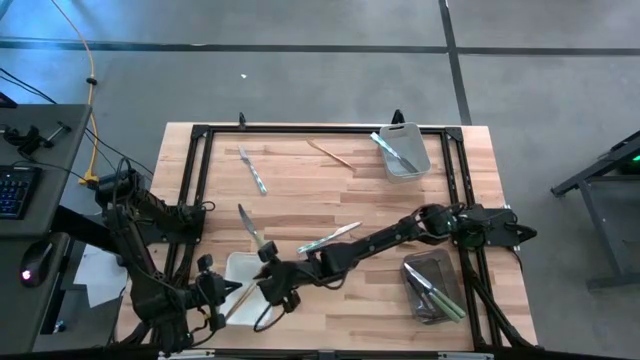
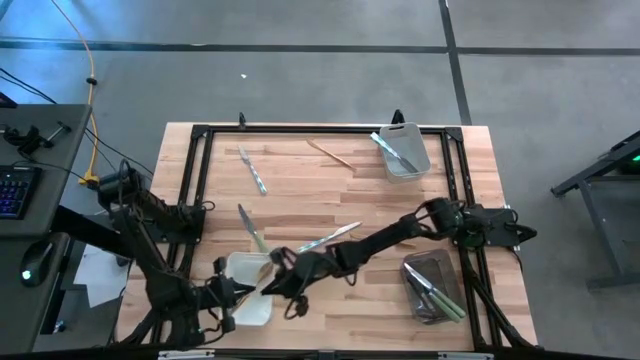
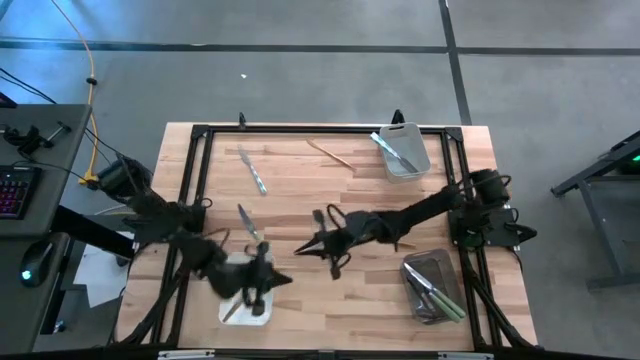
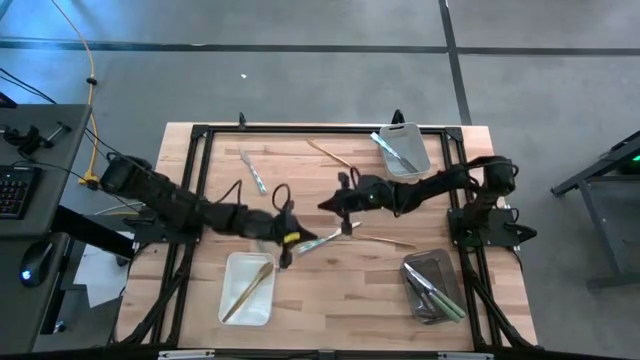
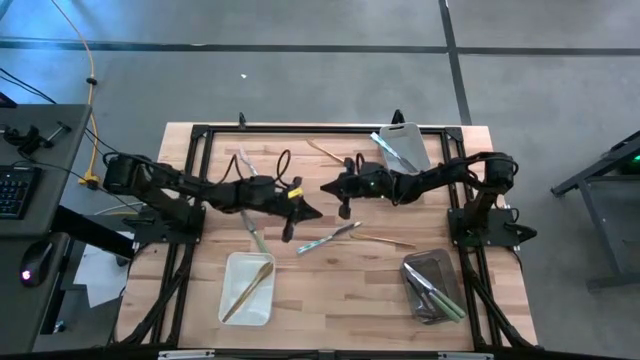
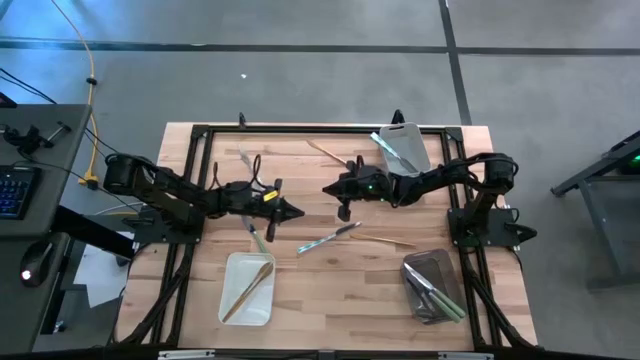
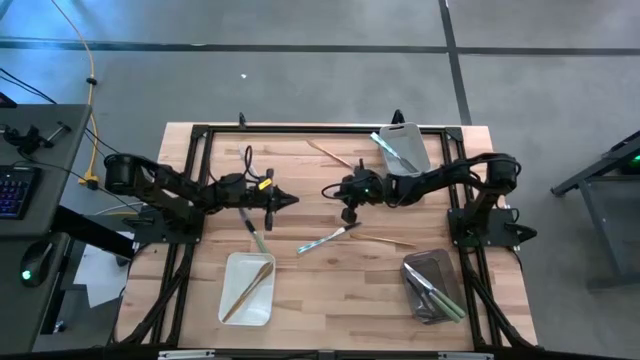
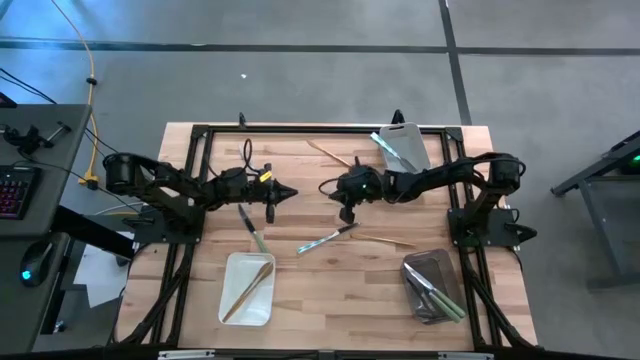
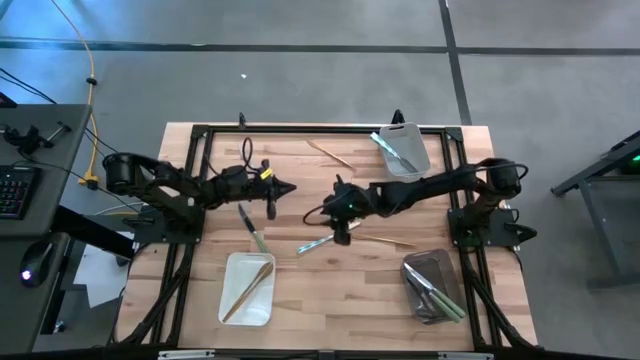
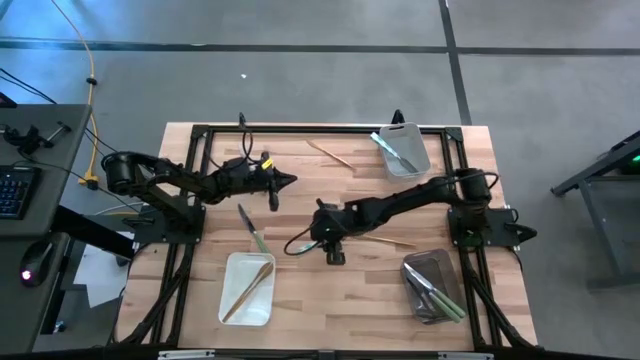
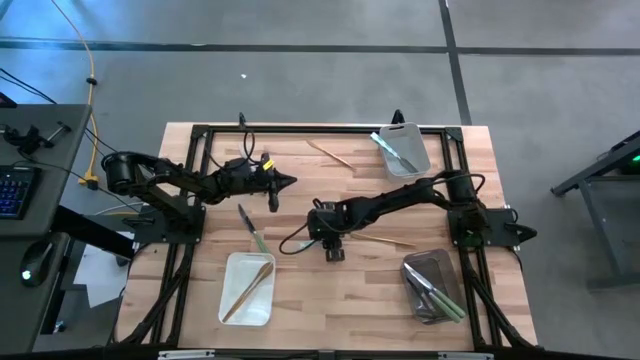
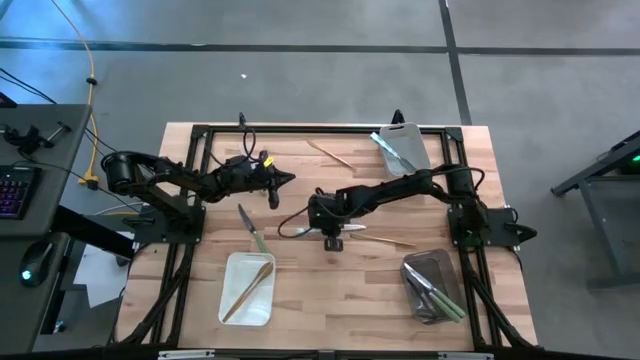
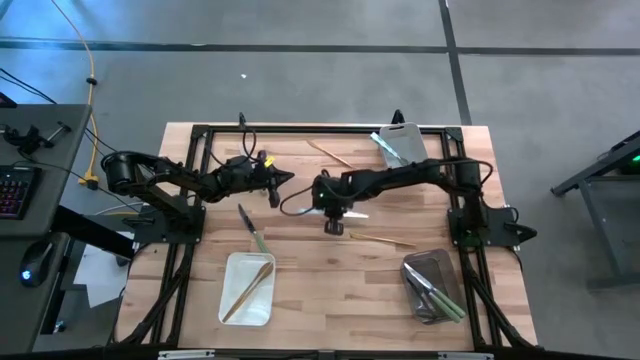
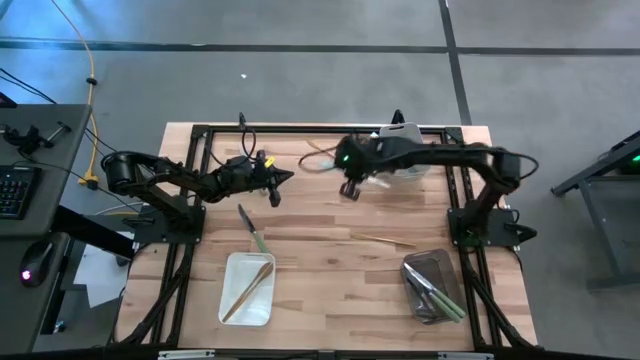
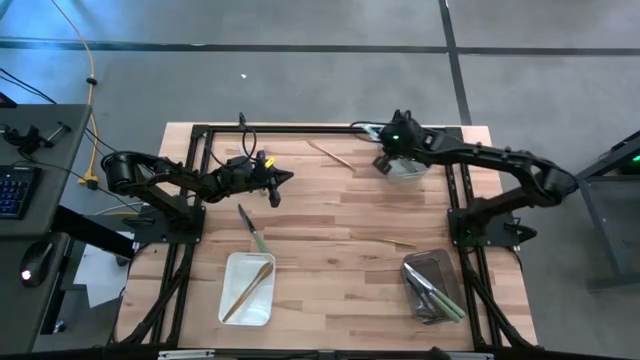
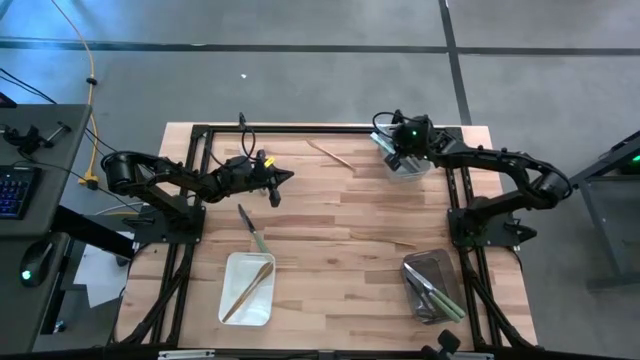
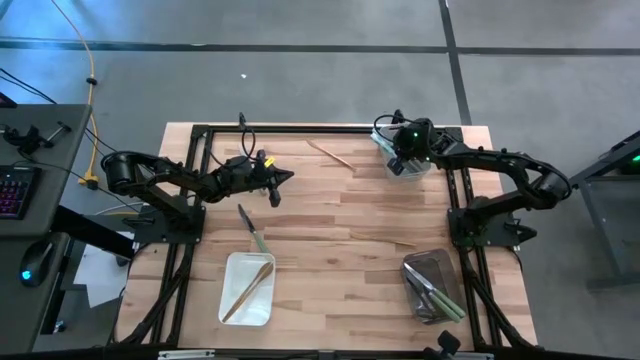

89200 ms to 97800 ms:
Task: Sort silverware by color (type)
Put the blue patterned table knife into the gray bin

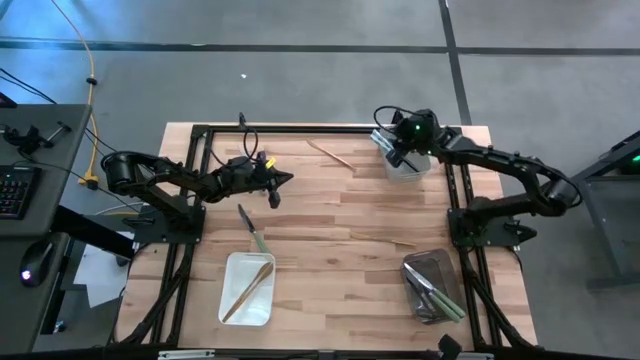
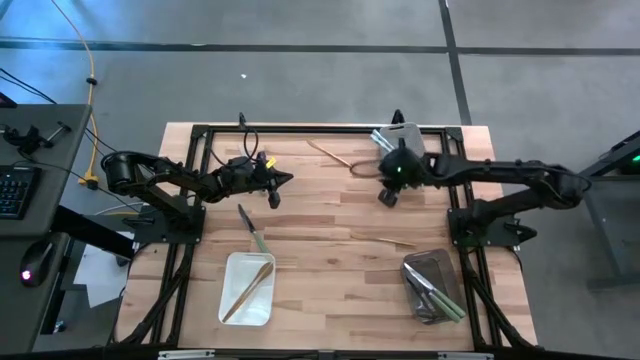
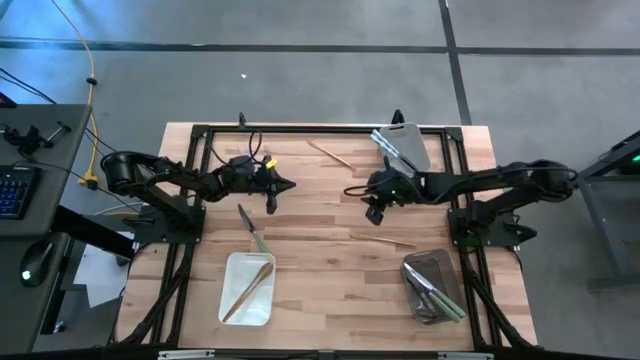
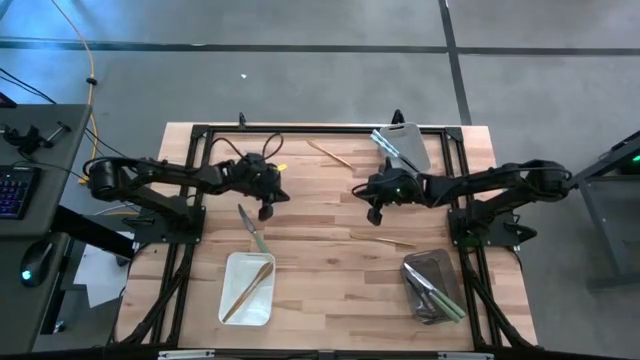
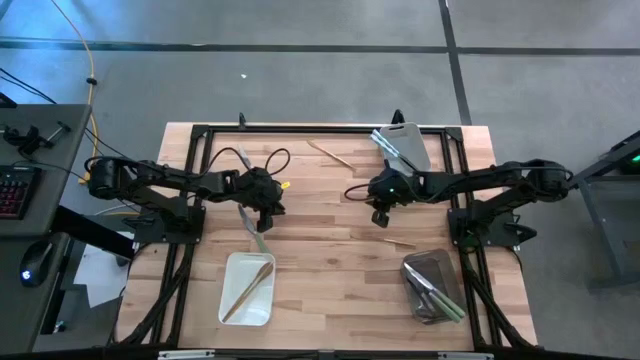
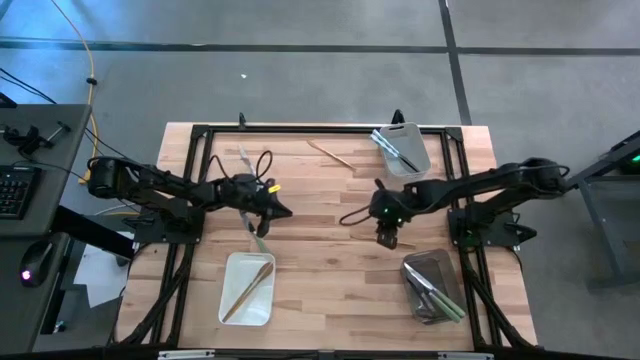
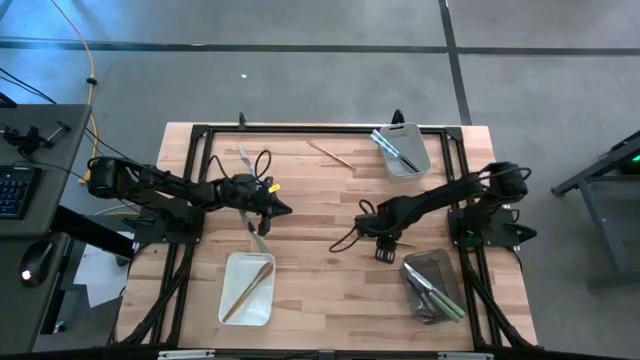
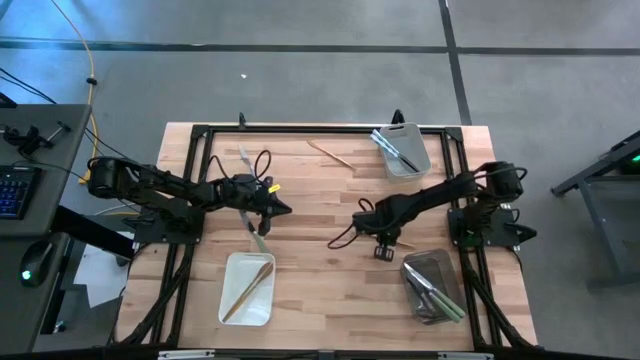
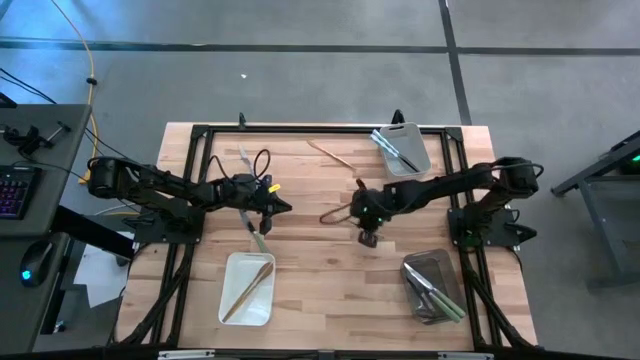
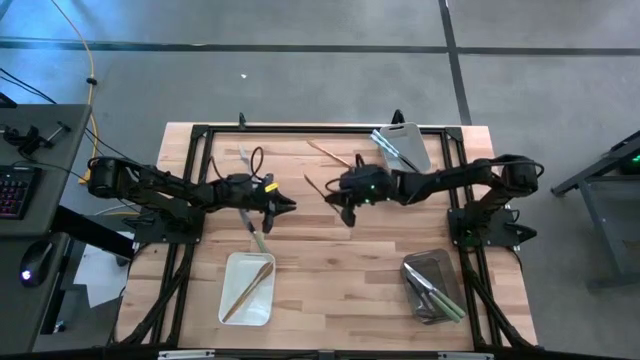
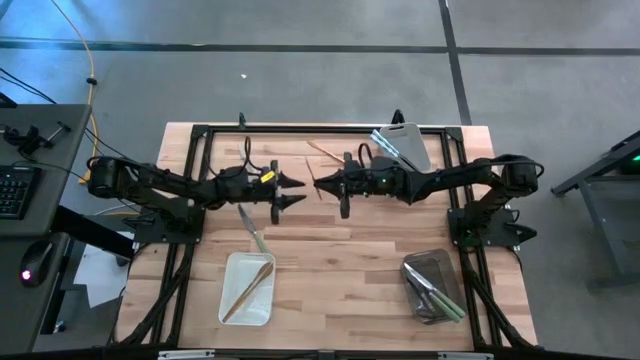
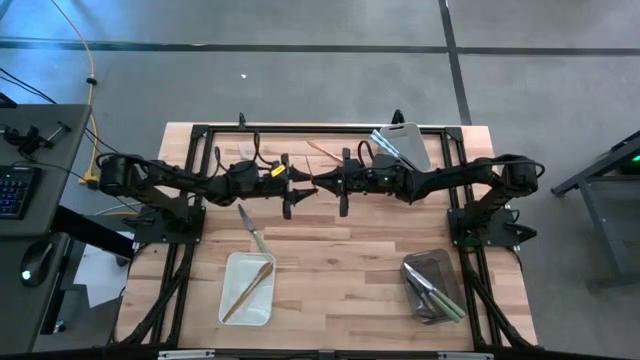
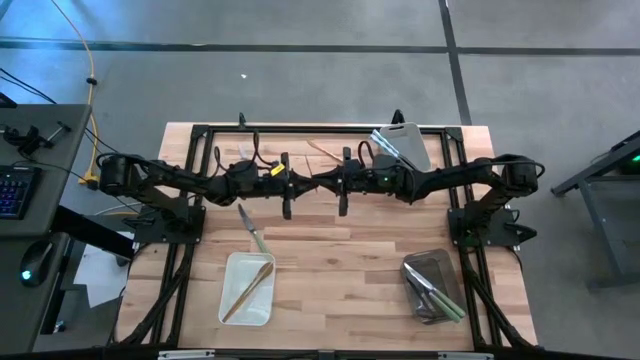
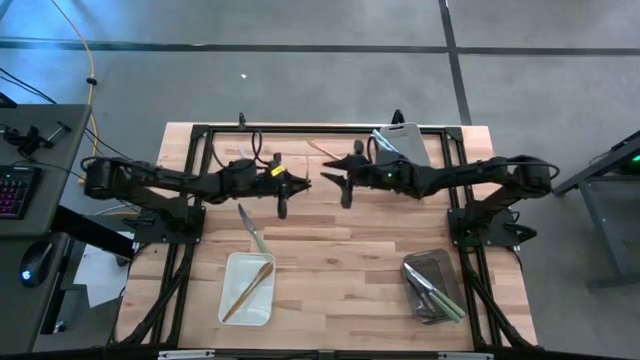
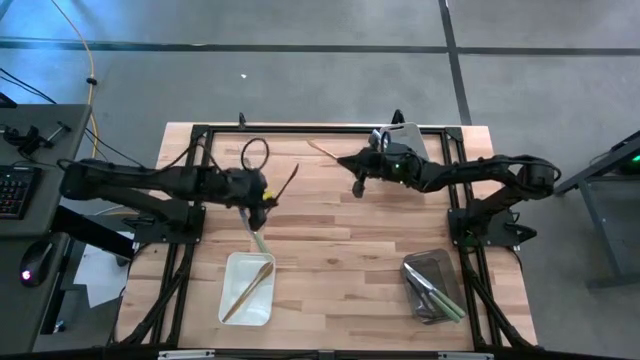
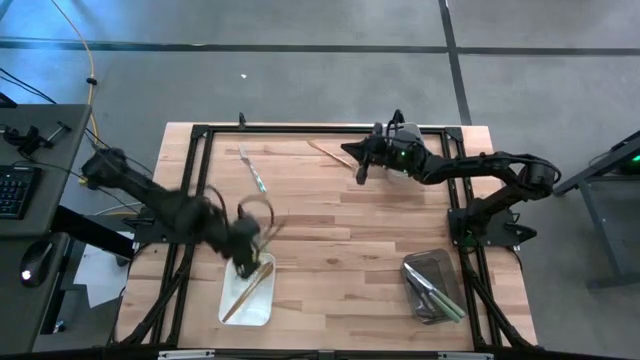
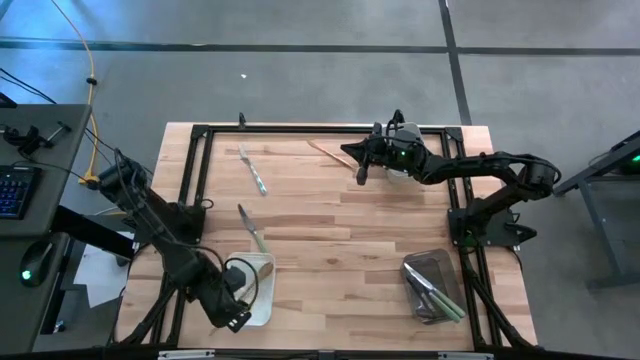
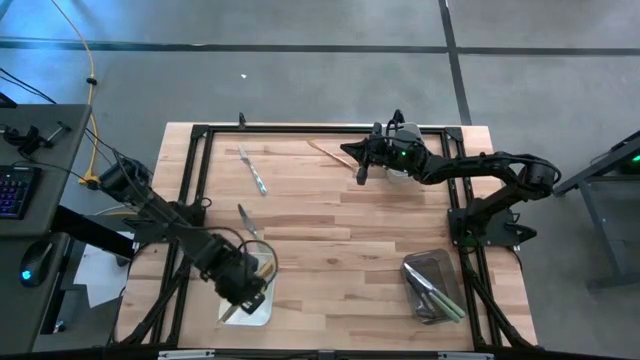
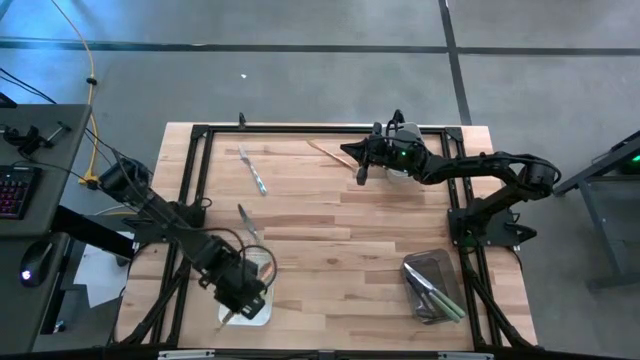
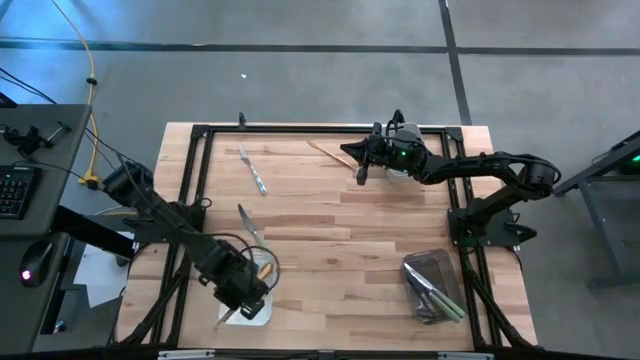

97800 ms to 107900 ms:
Put the gold table knife into the white bin

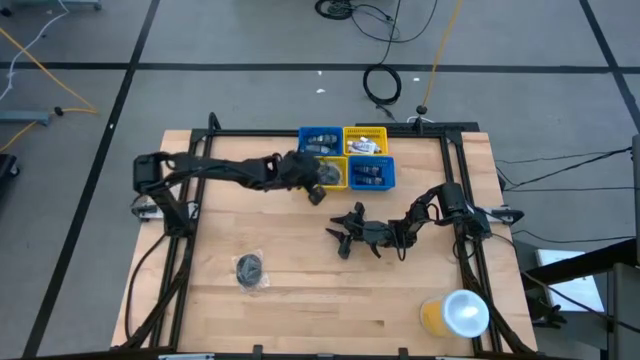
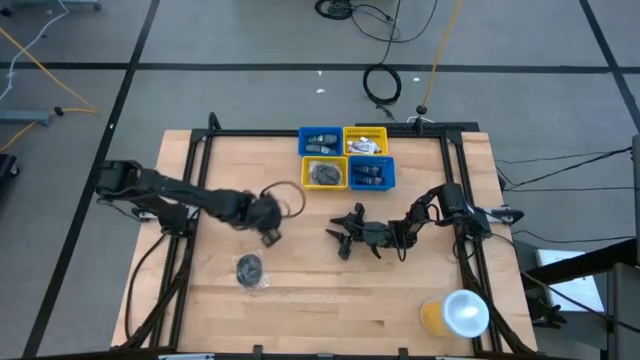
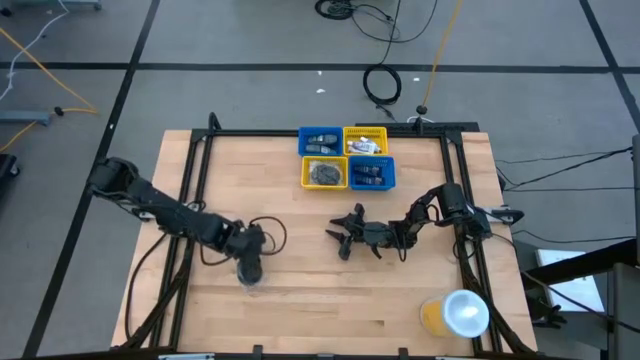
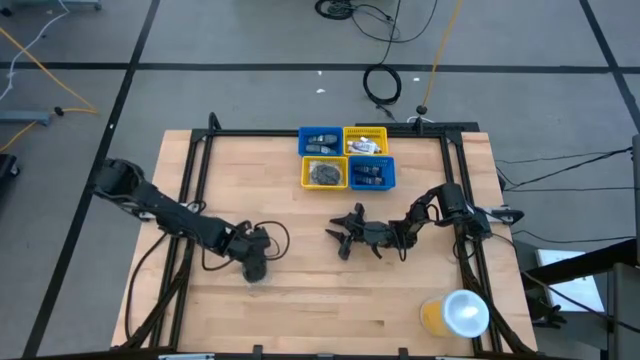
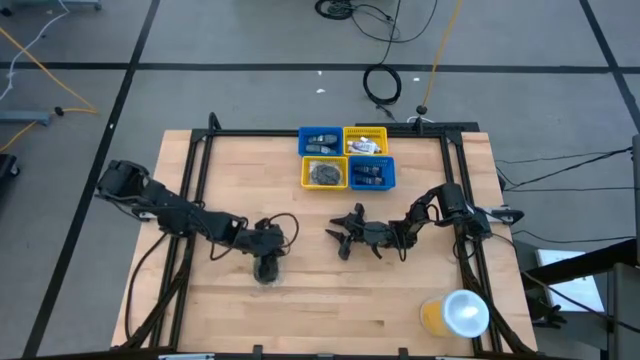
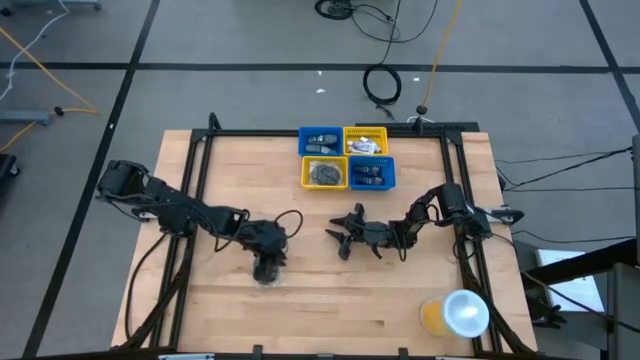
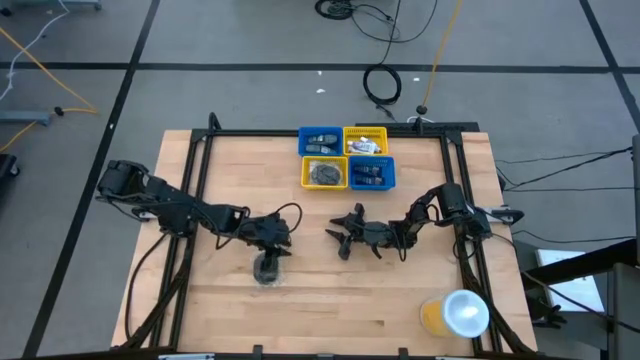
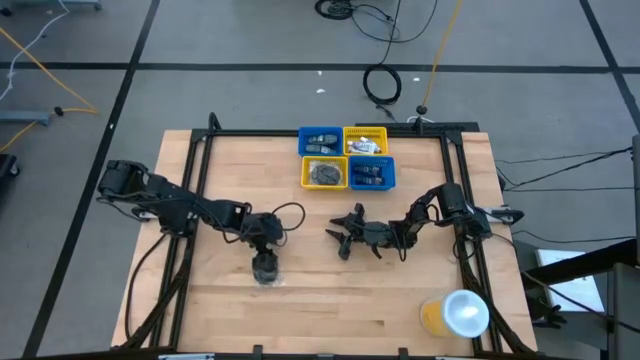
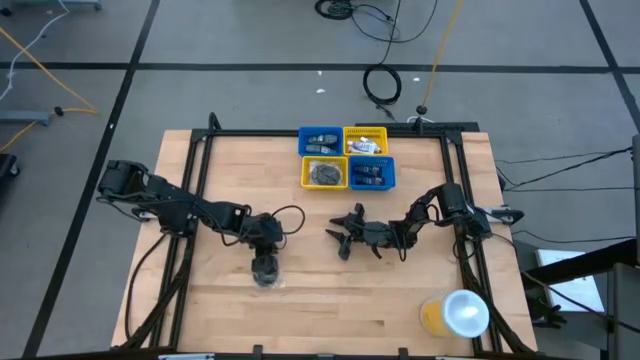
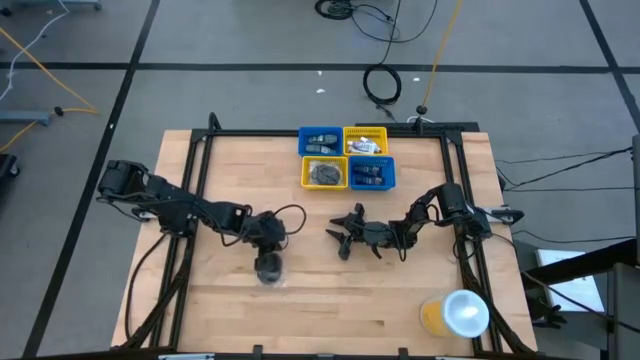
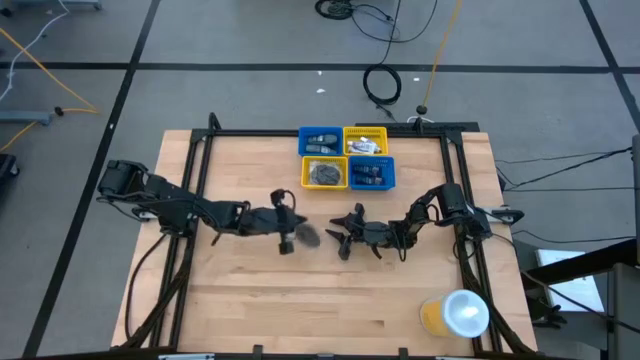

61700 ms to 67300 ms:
Task: Pick & Place Travel size toiletries
Put the black hairbrush into the left yellow bin
